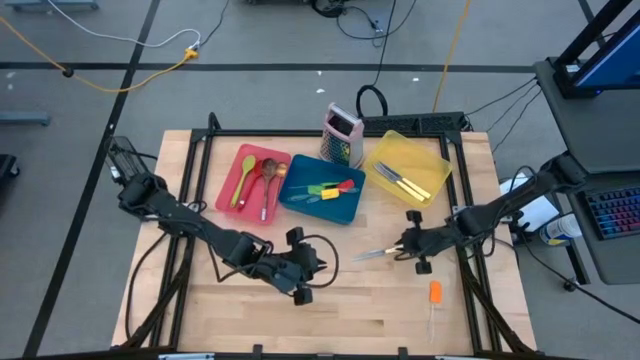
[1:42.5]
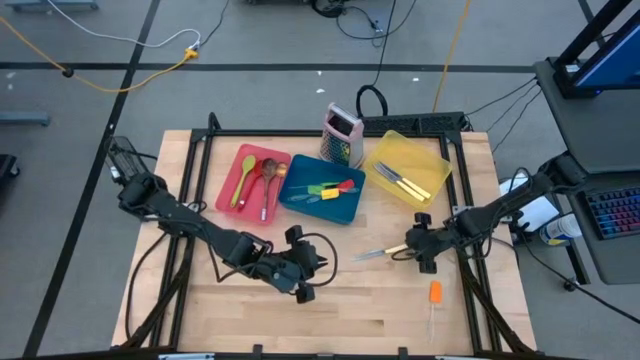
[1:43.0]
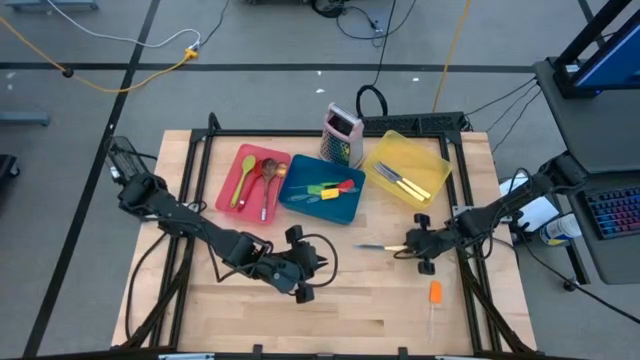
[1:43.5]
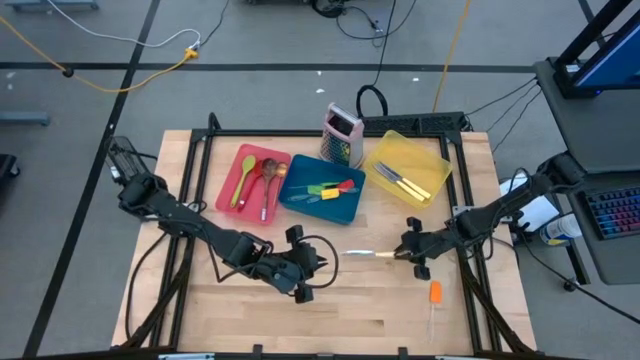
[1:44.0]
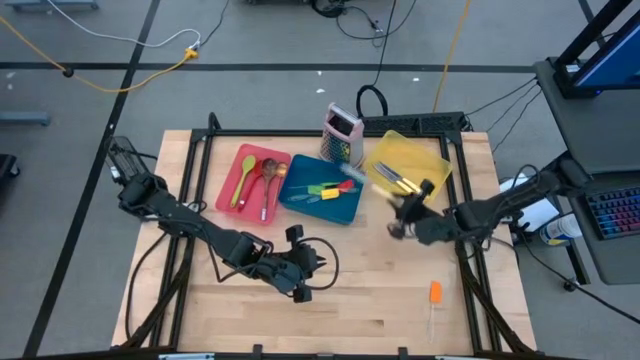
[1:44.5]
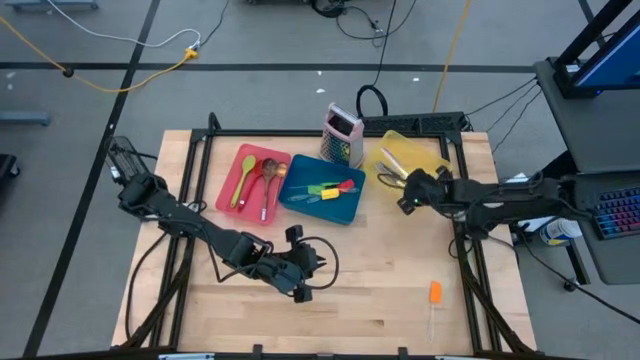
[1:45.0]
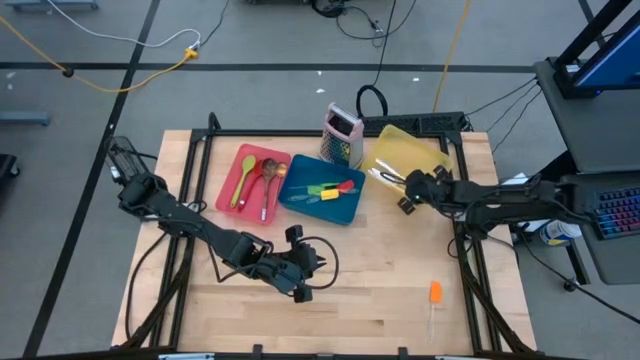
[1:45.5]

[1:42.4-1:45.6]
Task: Pick & Place Kitchen Items
Put the yellow knife into the yellow bin

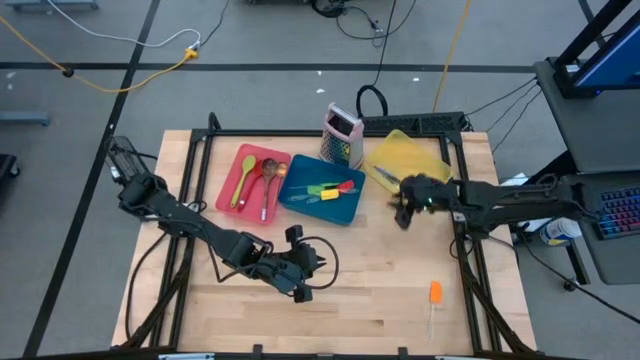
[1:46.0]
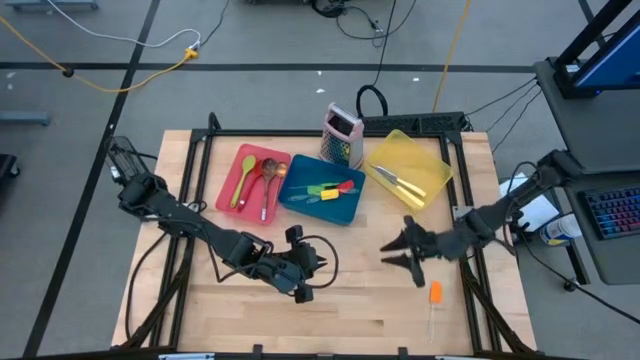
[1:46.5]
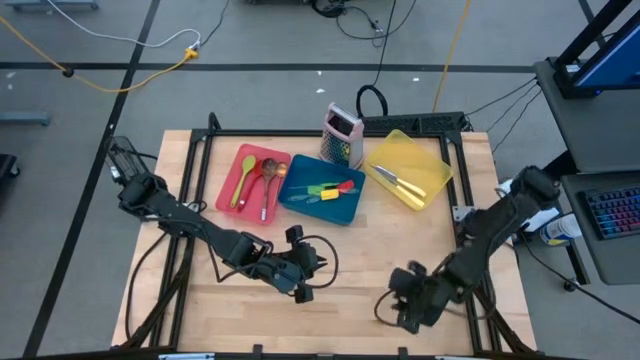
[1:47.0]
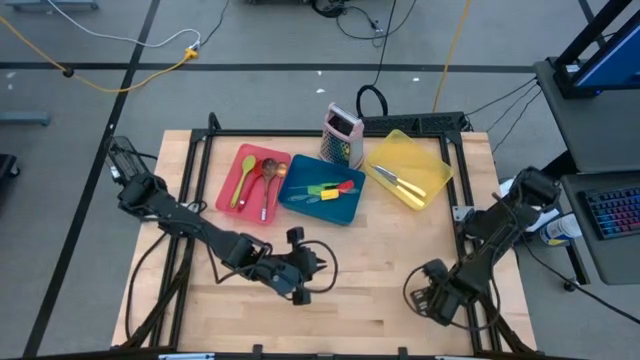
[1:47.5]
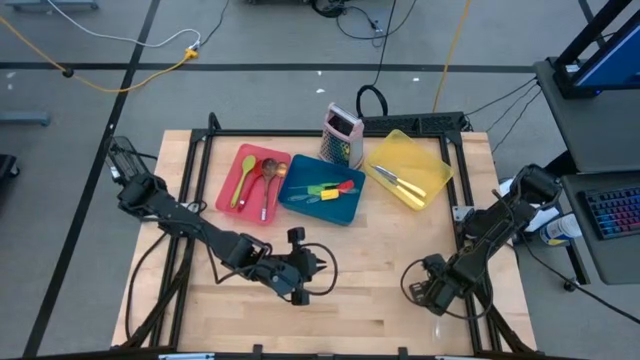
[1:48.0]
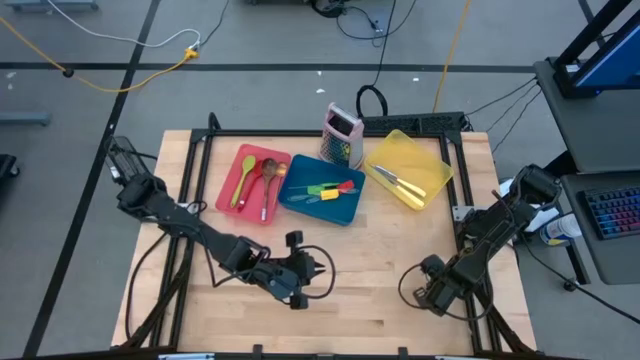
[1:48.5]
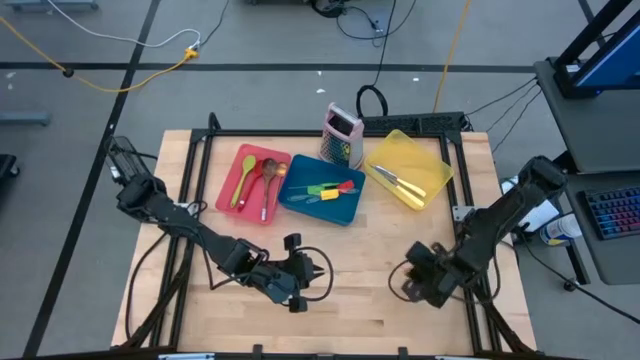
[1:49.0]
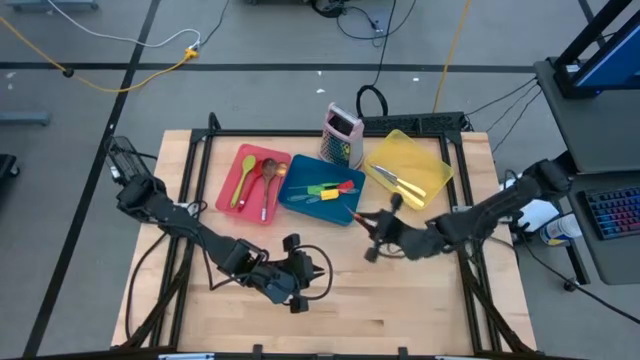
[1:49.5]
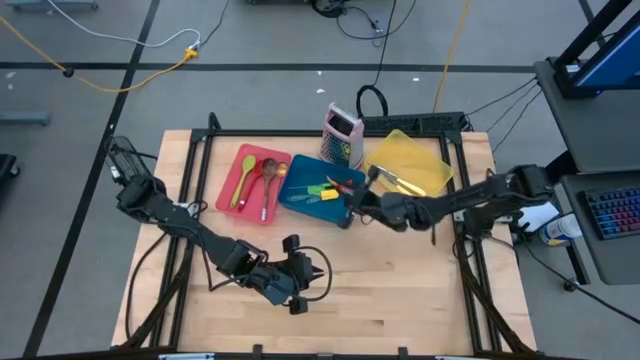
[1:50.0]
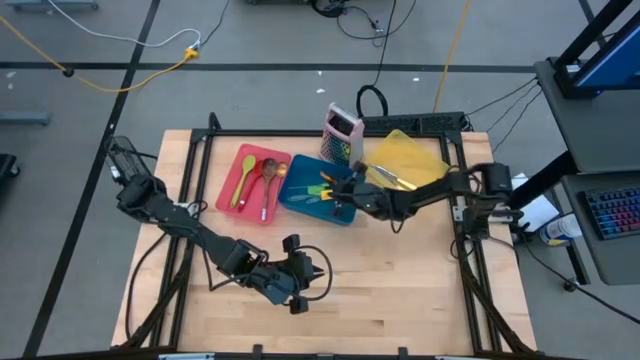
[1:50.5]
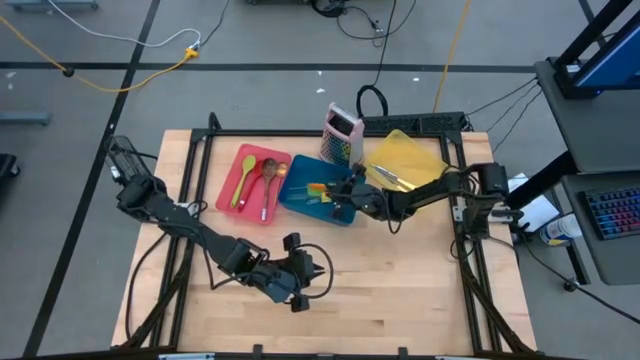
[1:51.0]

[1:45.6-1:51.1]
Put the orange spatula into the blue bin

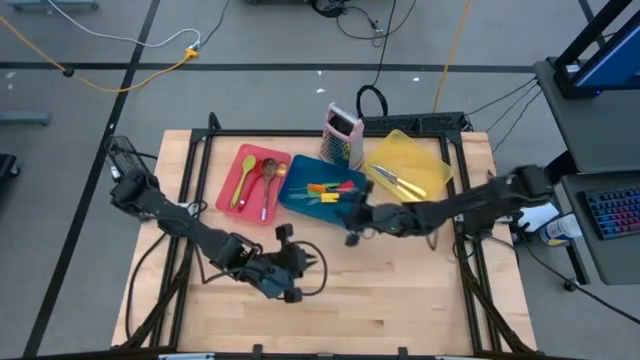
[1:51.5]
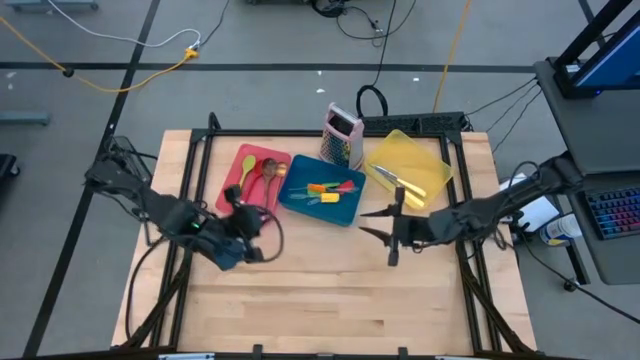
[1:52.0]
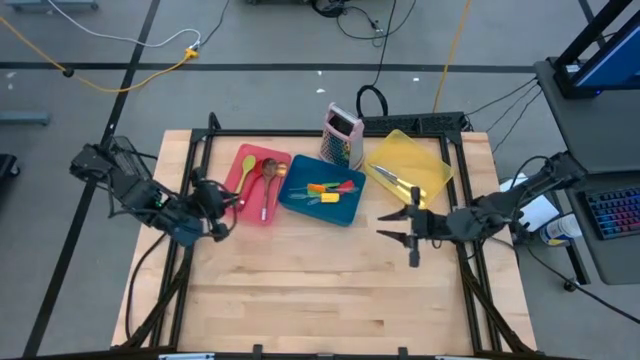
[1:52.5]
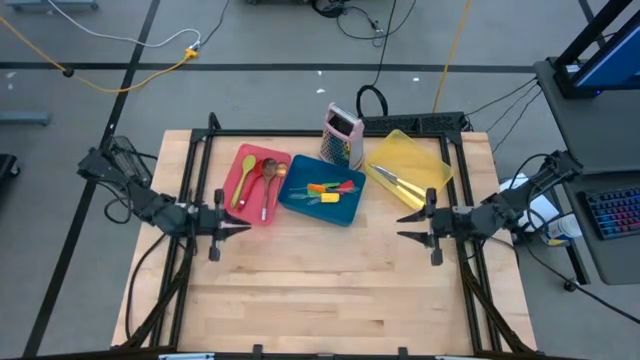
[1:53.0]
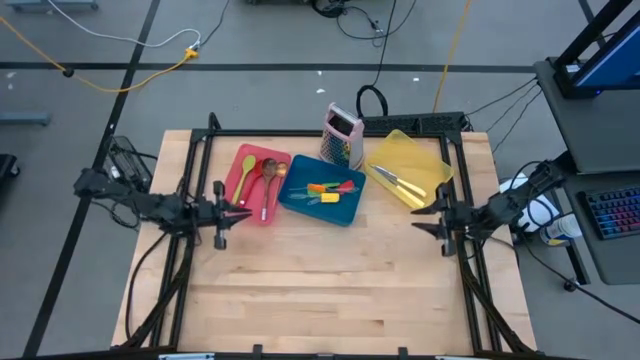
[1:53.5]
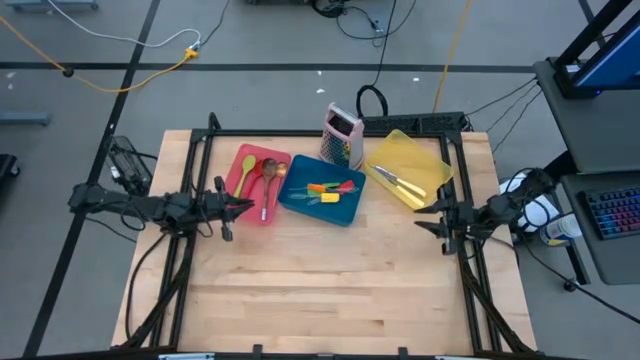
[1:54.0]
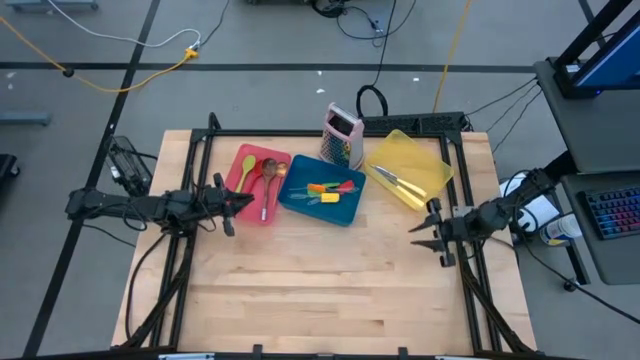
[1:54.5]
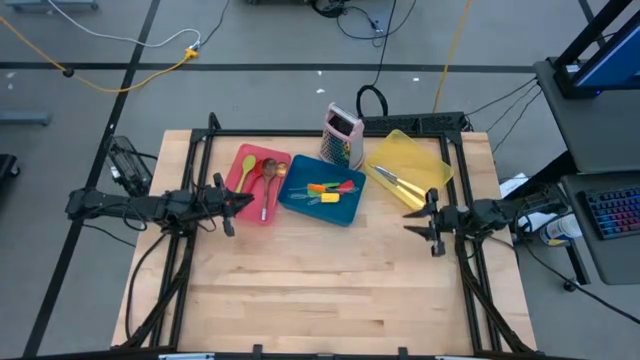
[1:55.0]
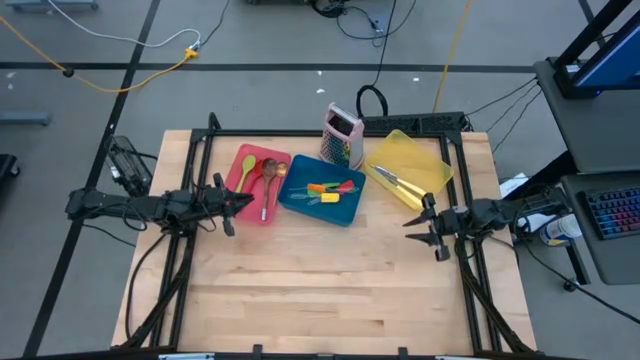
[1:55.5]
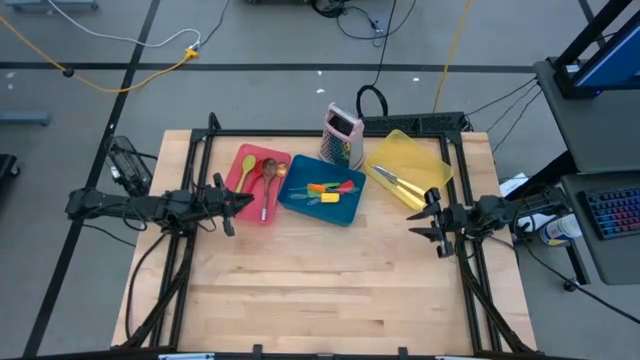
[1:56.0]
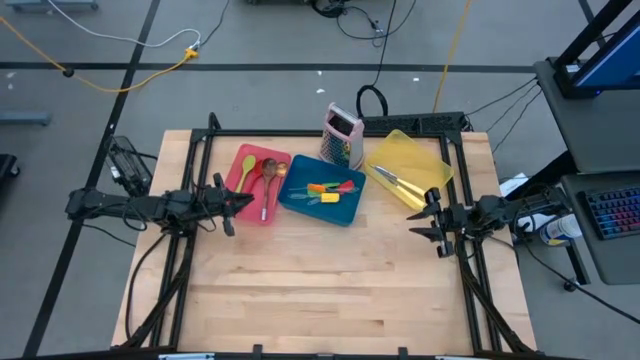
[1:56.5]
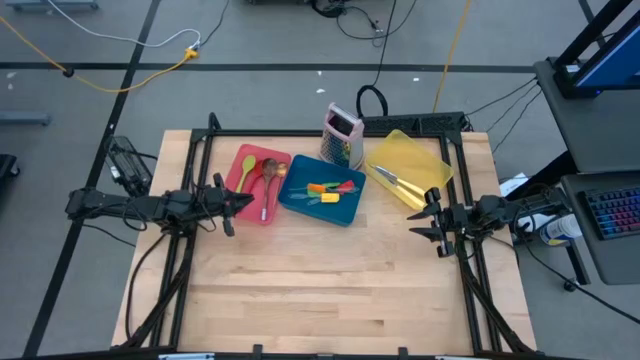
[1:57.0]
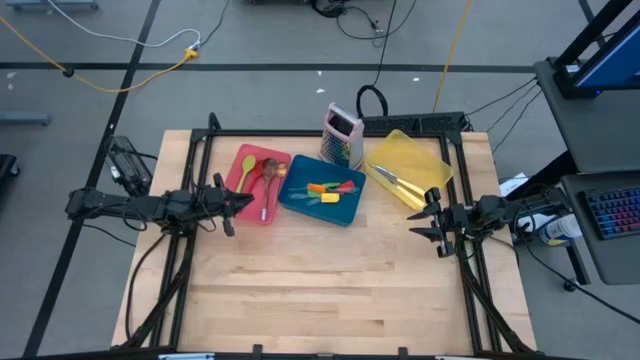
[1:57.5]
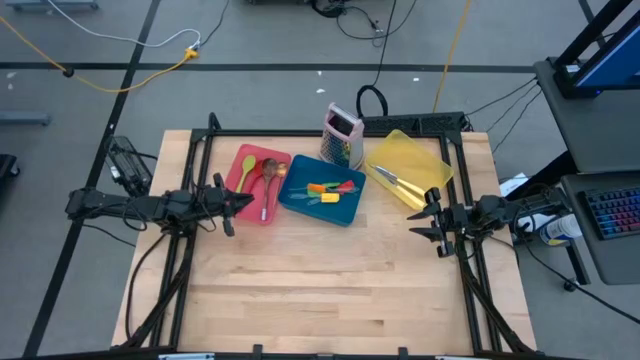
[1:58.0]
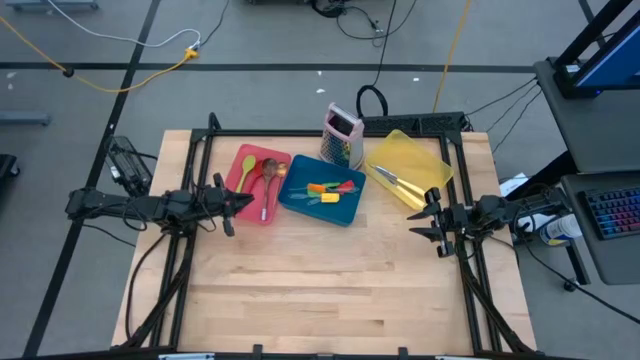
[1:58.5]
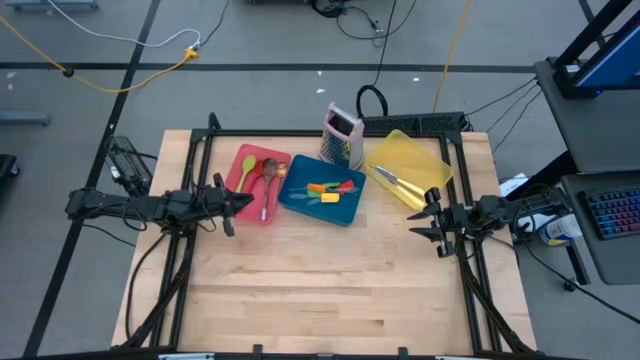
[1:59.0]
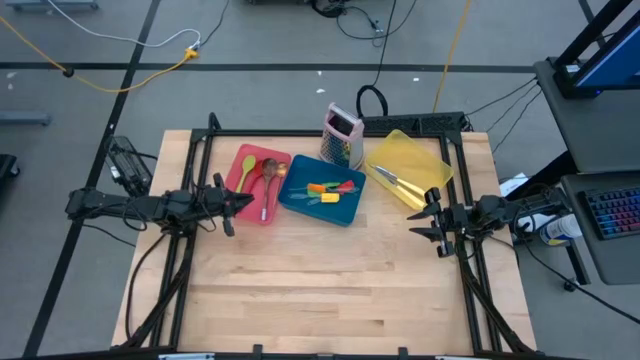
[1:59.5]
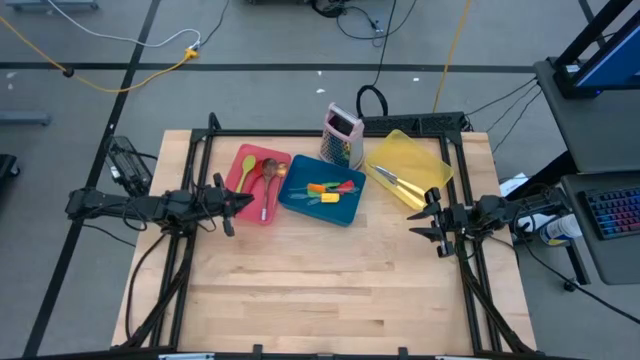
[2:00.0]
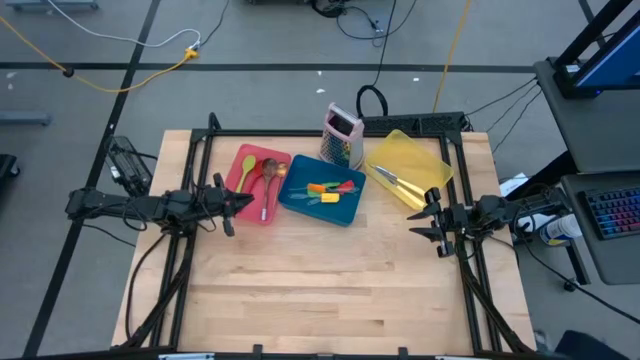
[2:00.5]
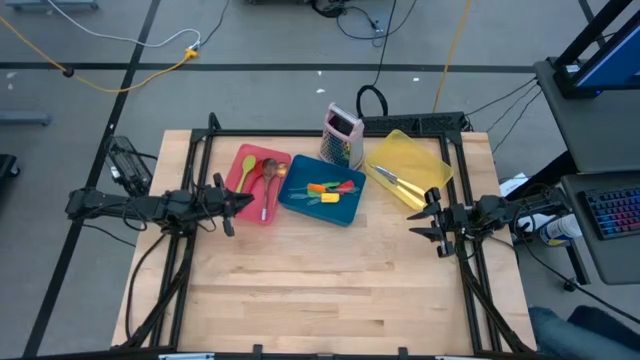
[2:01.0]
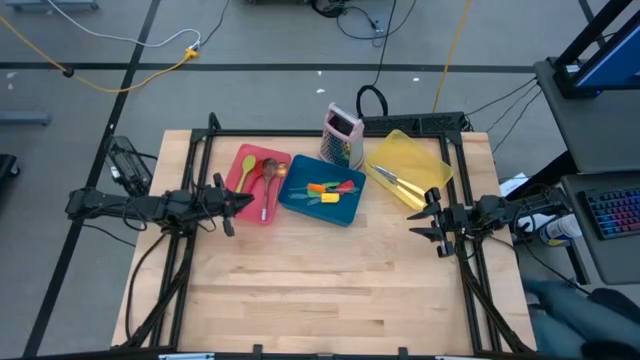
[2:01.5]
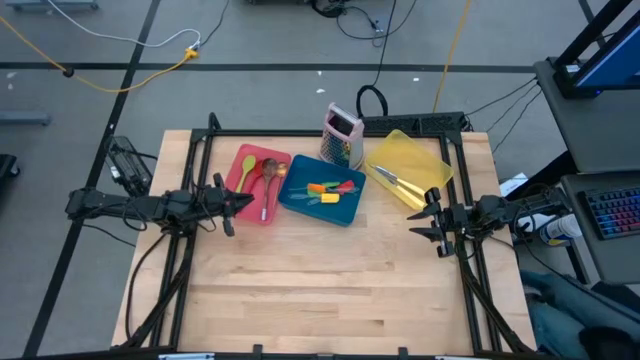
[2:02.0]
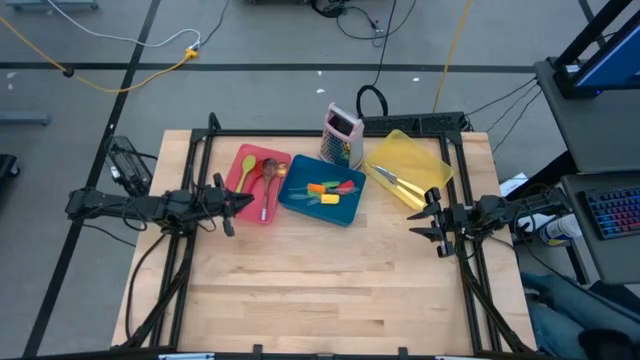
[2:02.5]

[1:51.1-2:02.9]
Return to Home Position

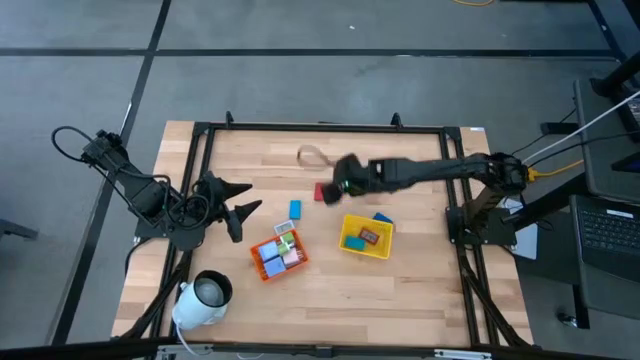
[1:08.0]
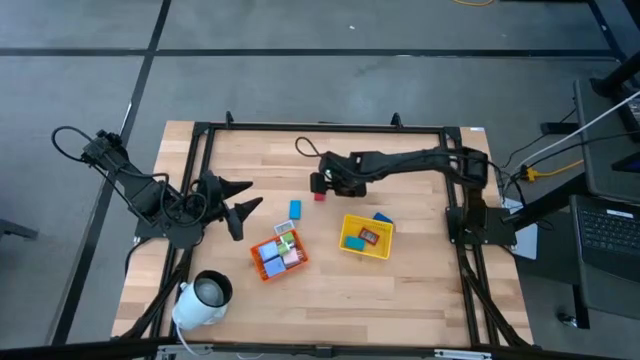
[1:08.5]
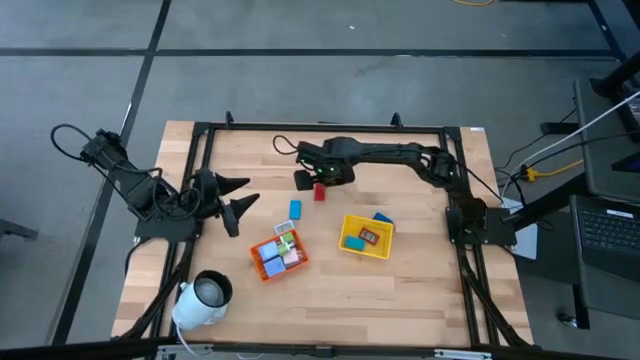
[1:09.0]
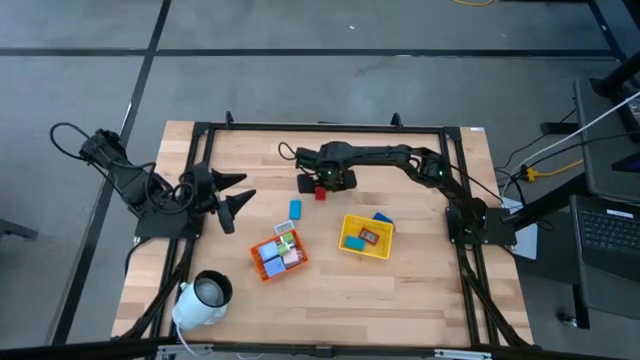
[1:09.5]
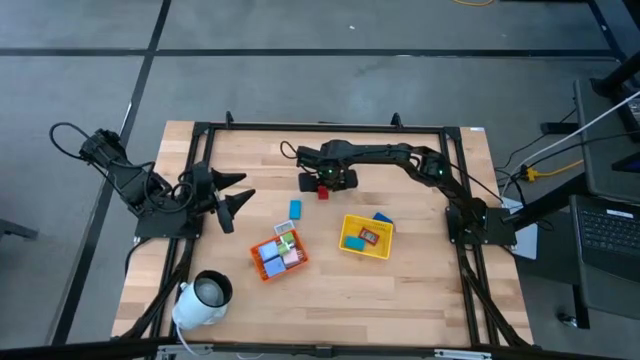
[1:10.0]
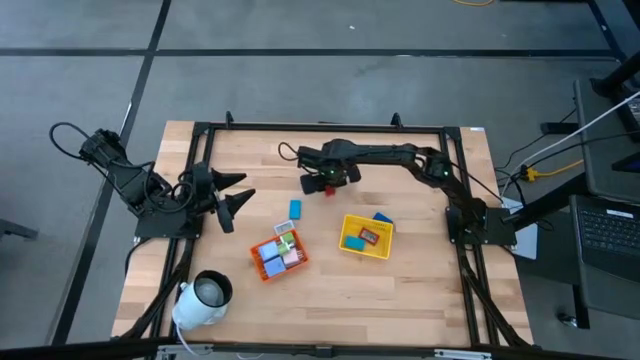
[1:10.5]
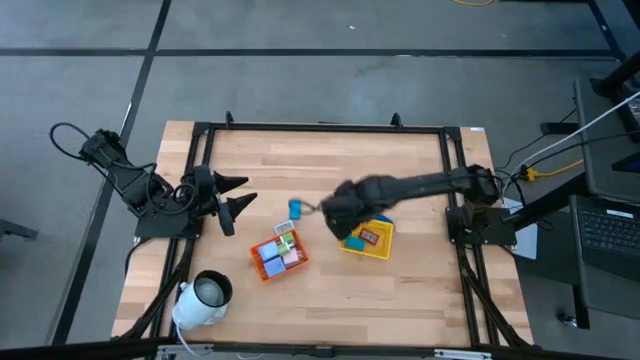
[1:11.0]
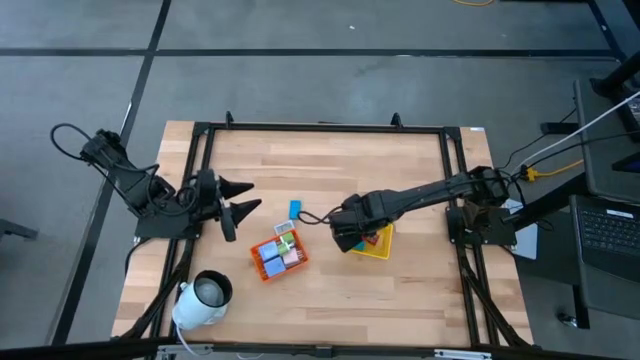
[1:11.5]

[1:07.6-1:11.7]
Task: Pick & Place Office items
Put the red digital clock into the yellow bin
